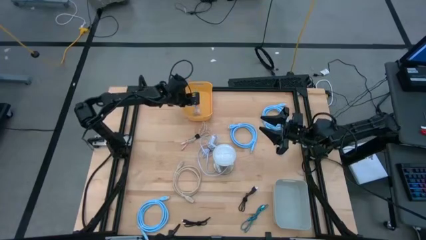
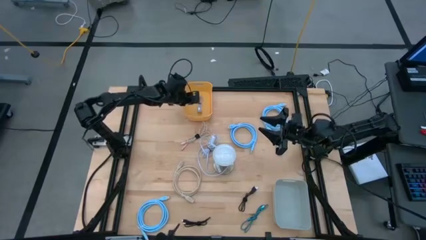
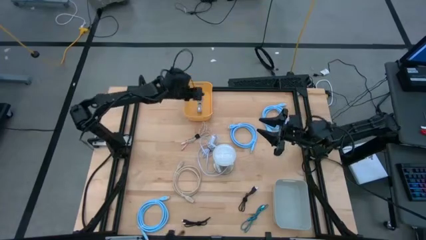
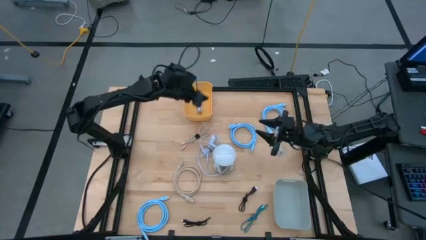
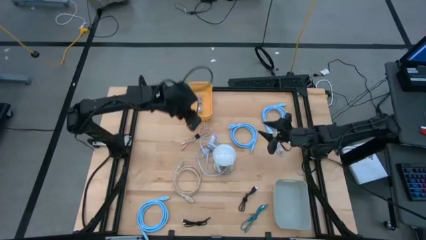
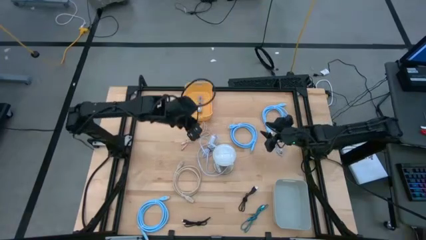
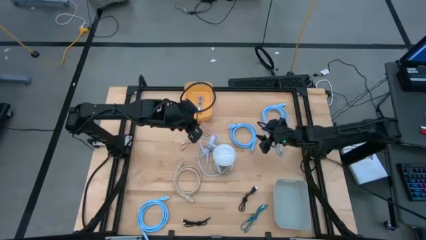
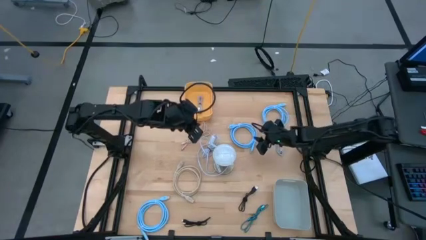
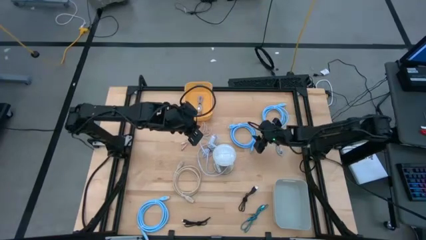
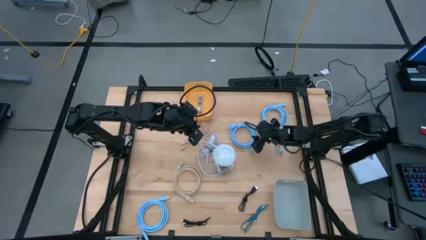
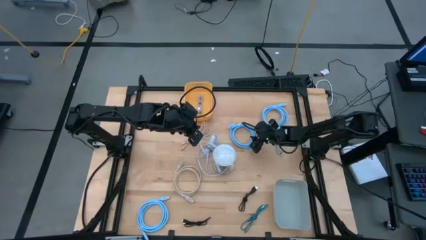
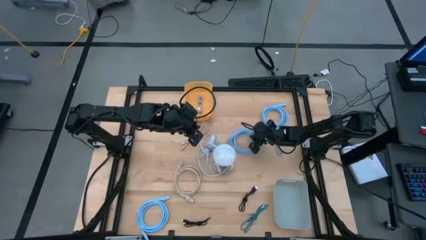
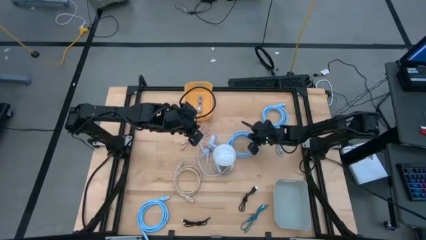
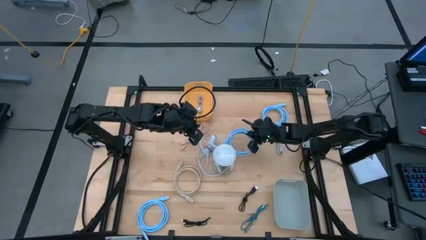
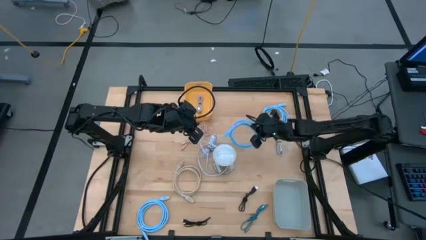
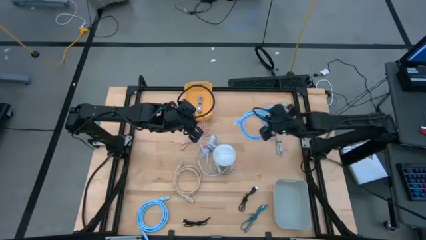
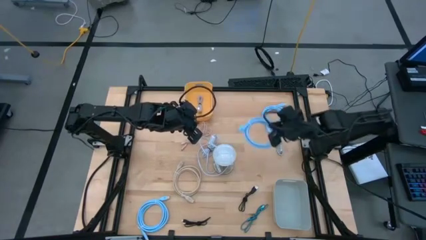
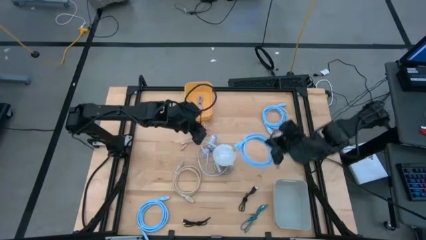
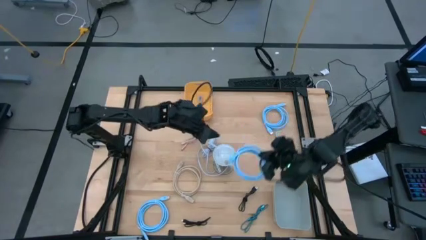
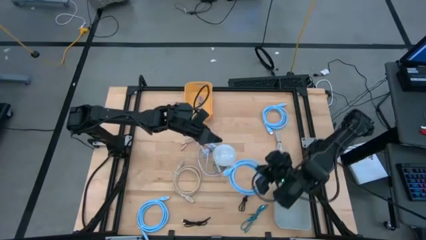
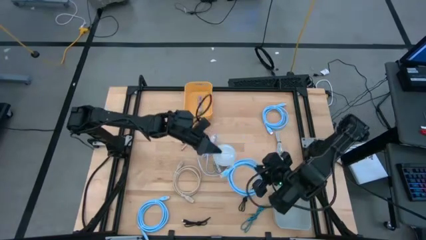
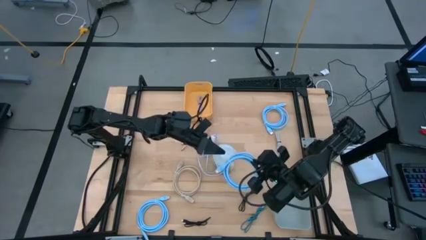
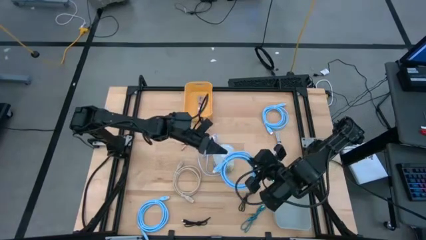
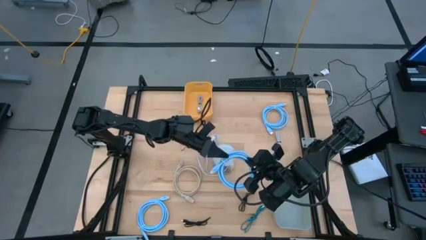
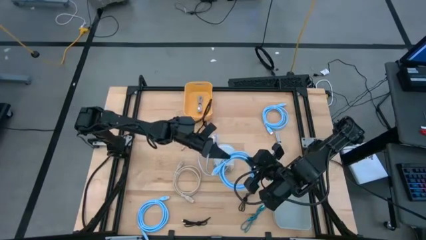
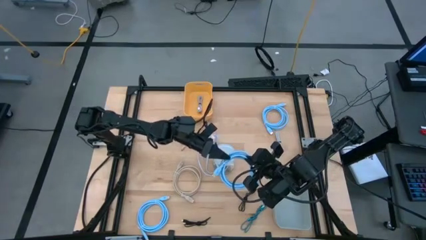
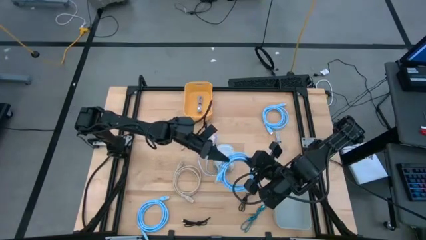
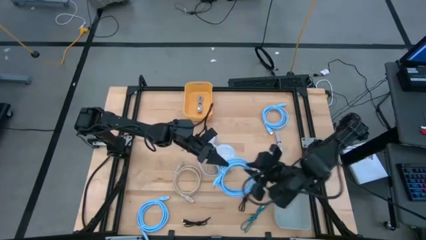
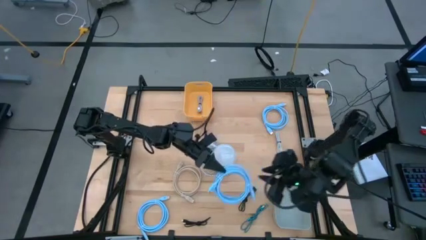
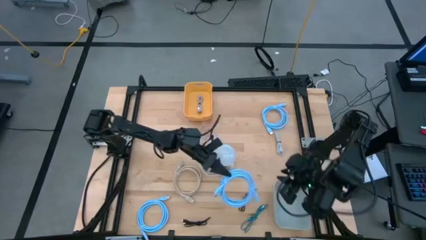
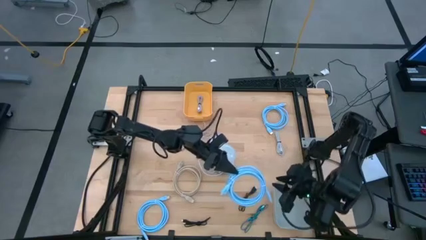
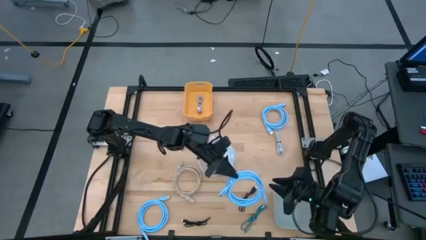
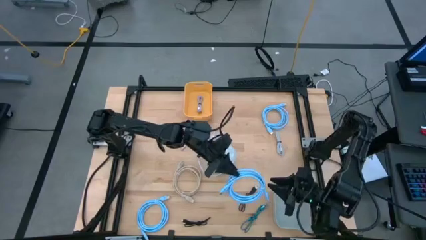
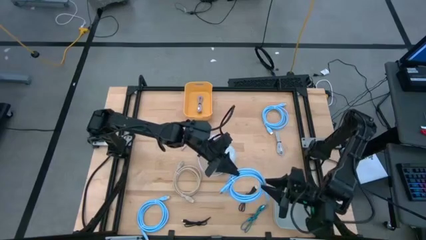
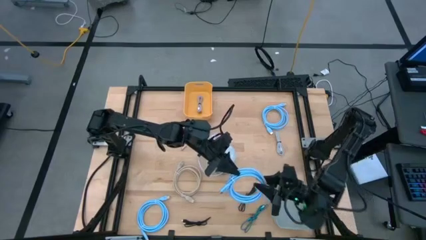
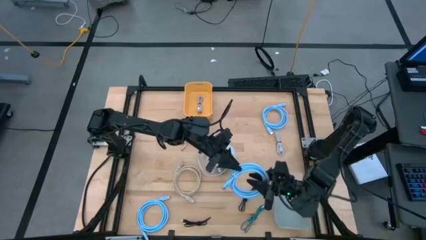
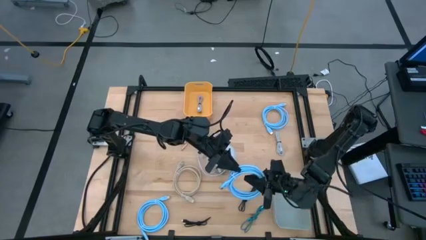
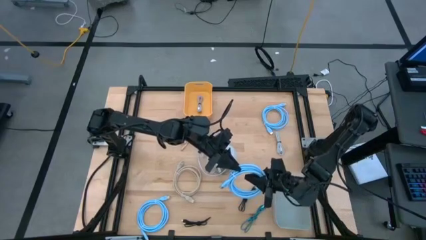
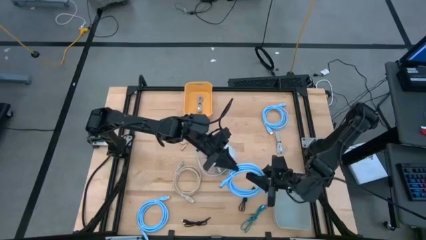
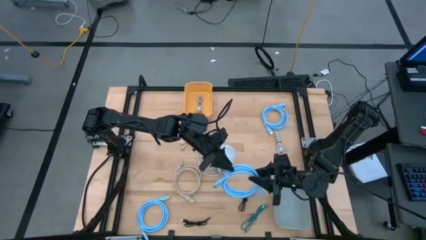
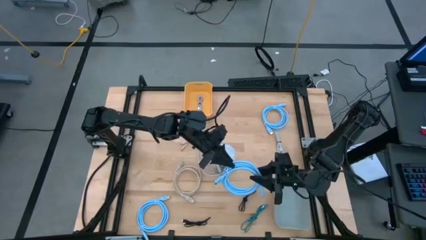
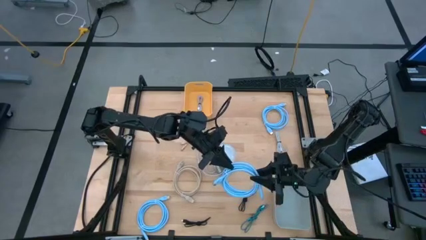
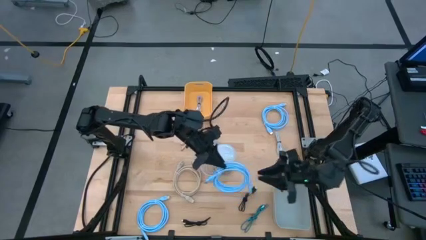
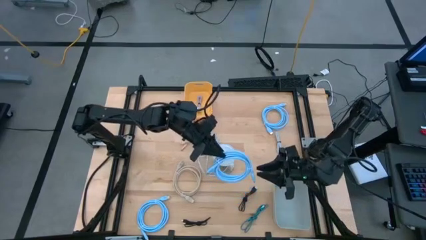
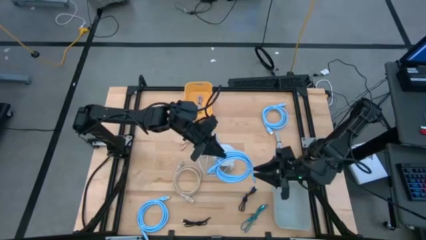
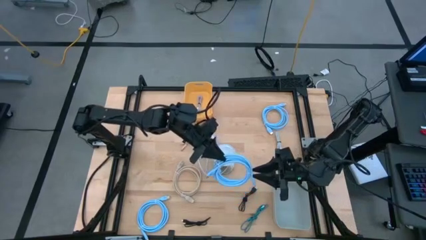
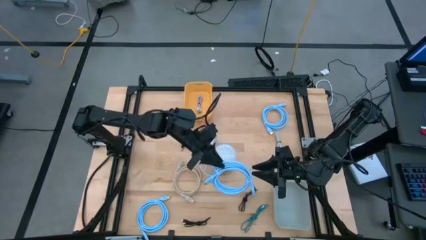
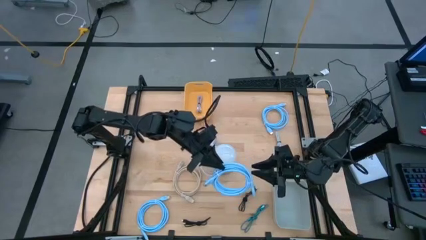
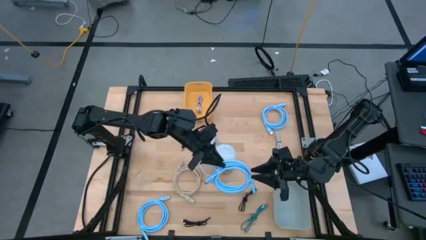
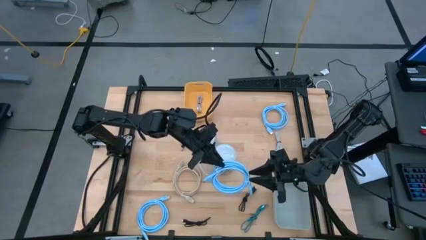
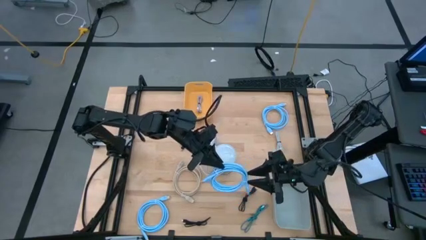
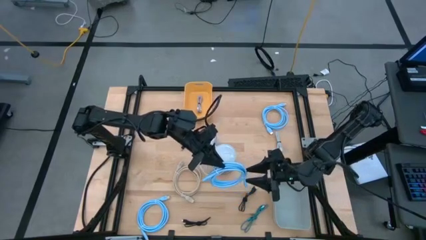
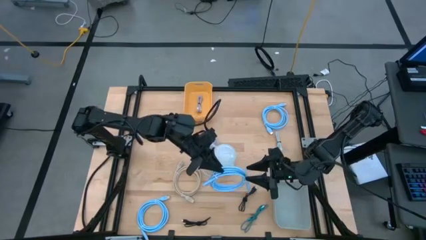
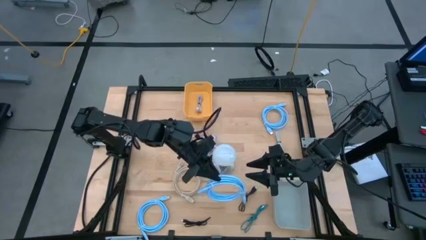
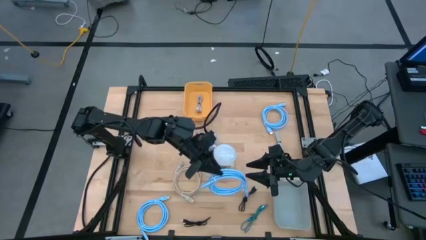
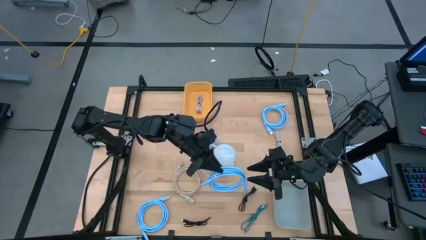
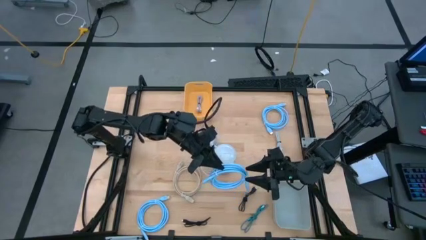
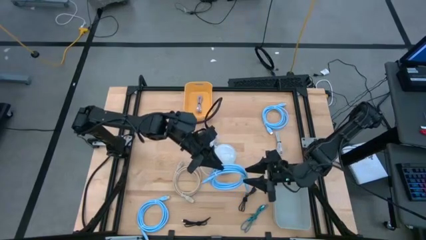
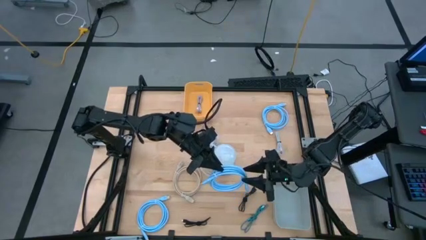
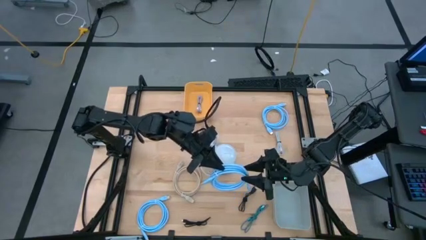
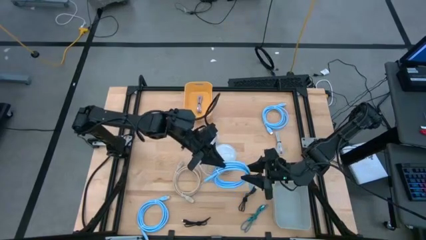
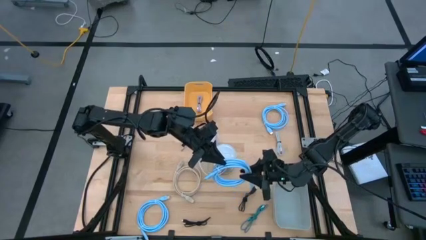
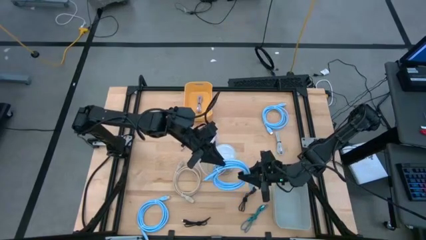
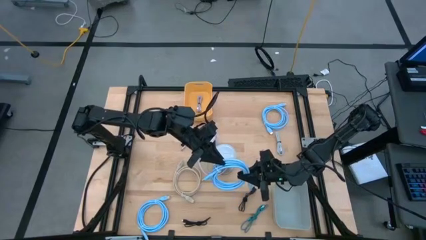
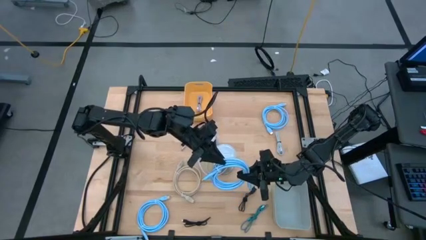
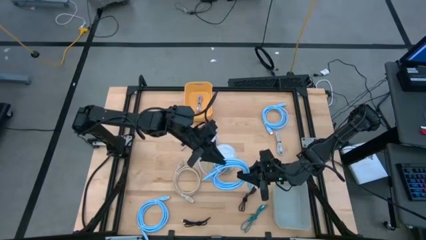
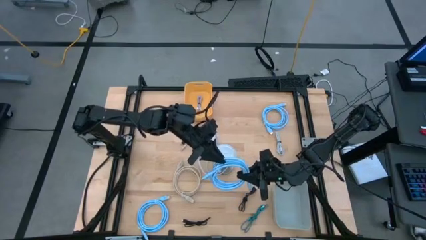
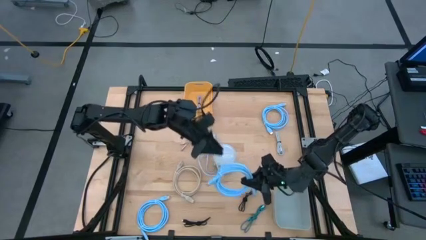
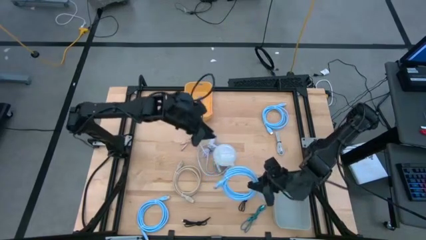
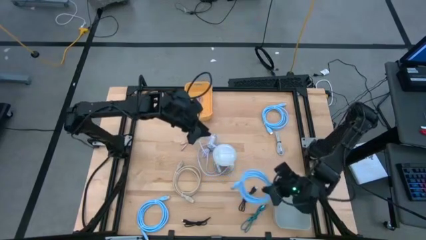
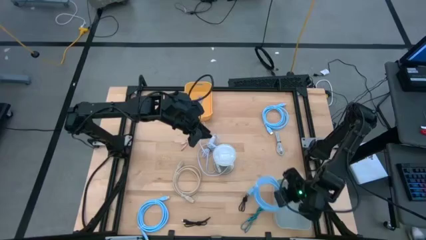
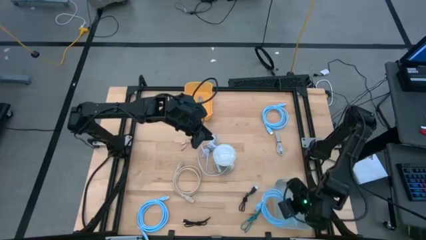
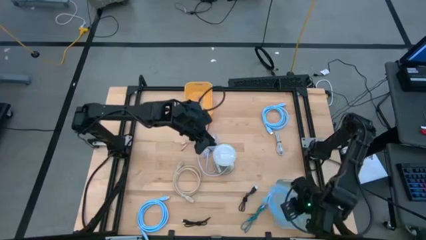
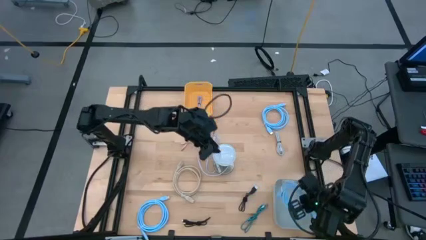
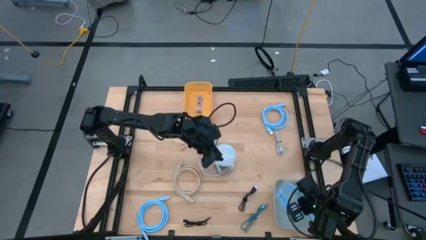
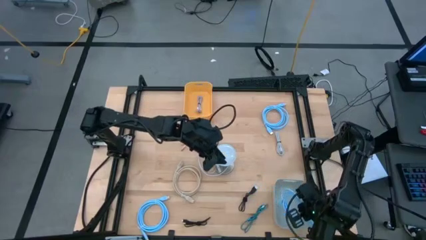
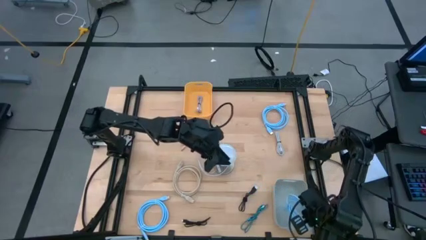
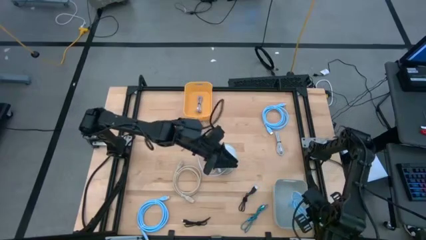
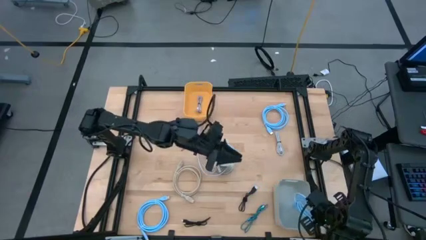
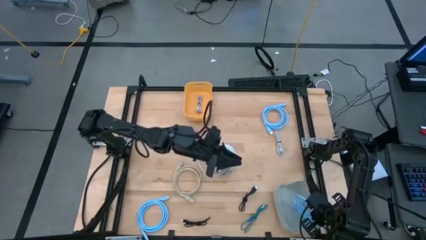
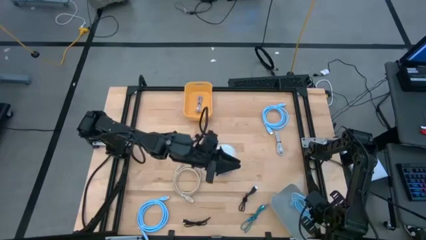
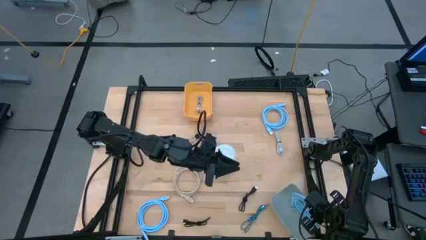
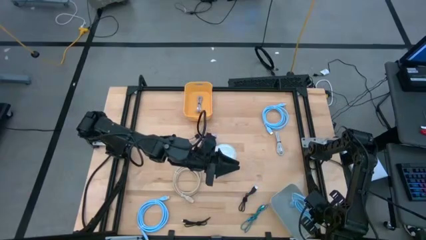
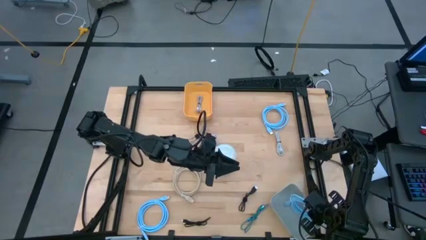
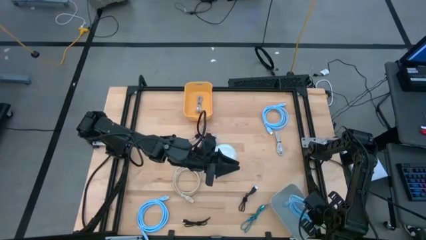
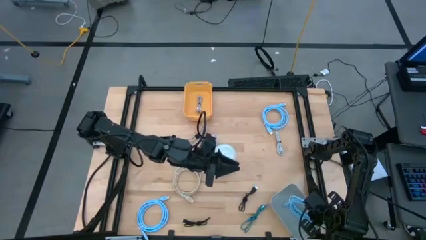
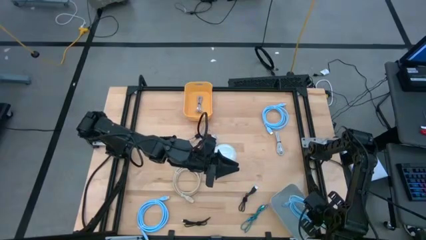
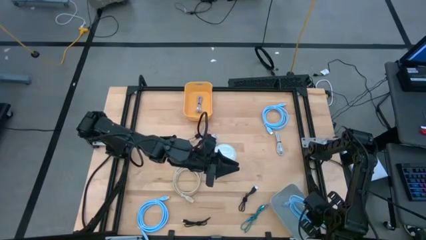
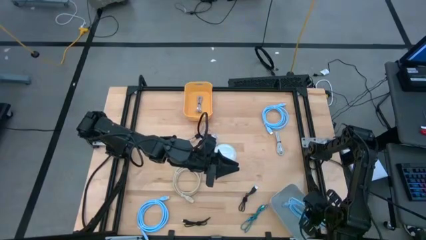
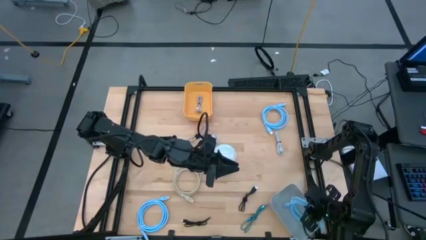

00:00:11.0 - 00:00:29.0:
Task: Pick & Place USB Port
Put the middle blue HDMI cable into the gray bin
